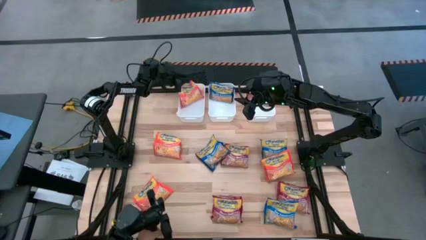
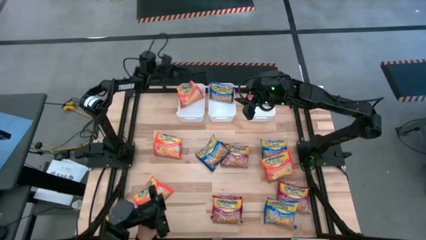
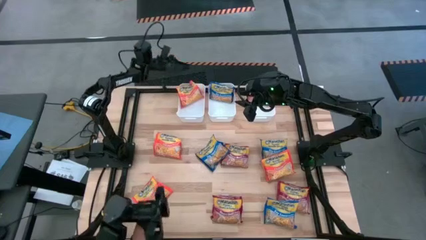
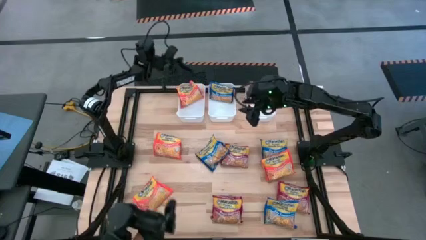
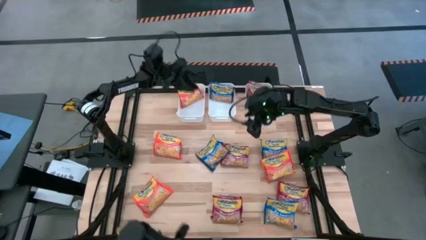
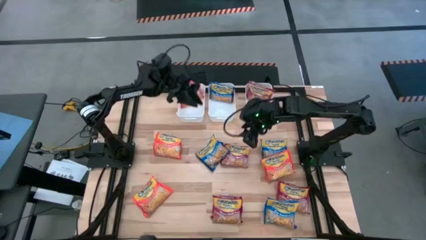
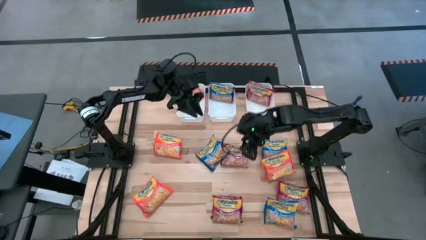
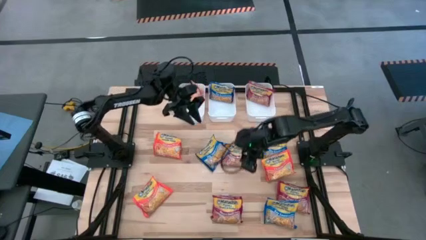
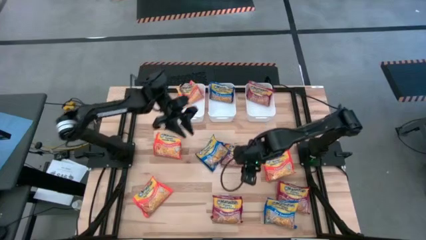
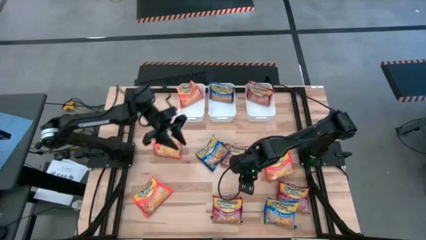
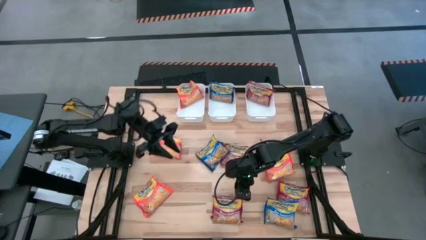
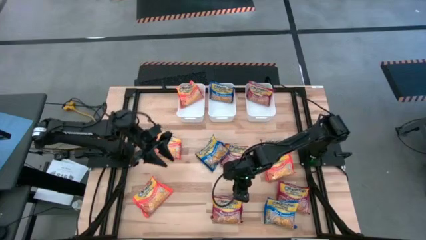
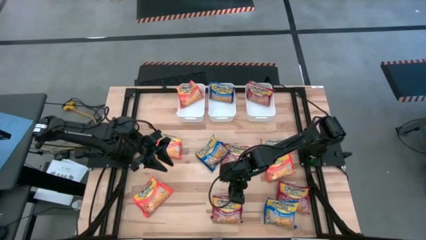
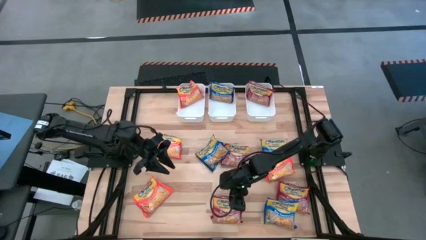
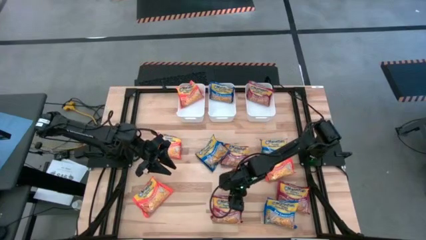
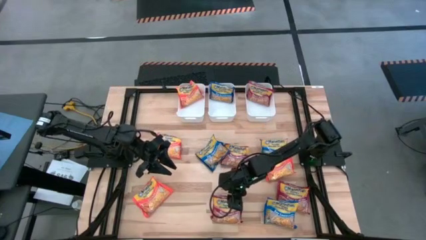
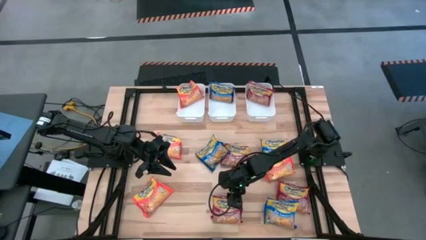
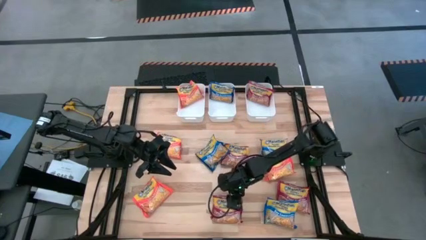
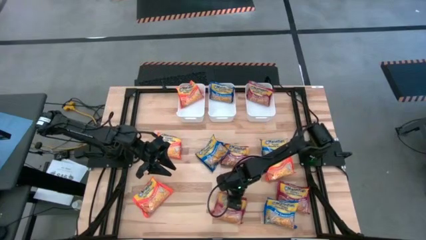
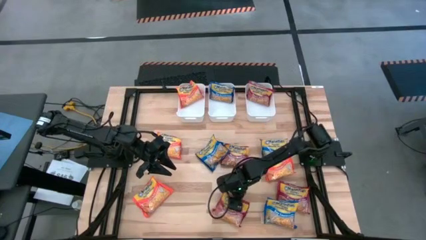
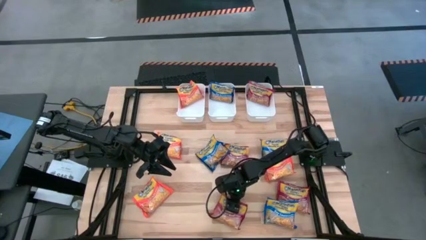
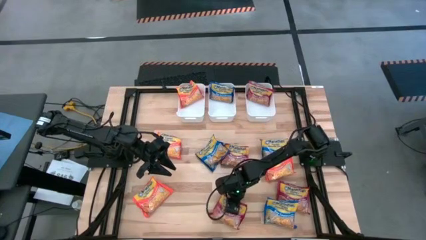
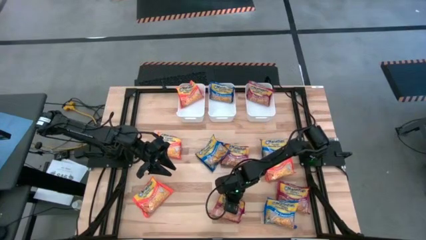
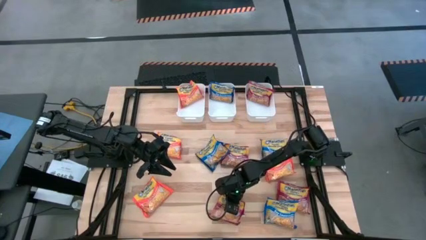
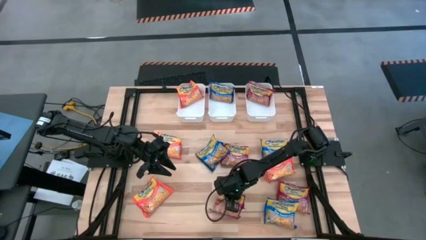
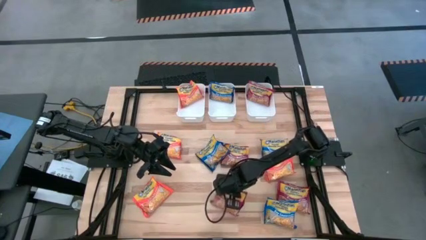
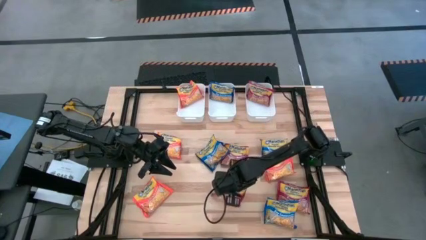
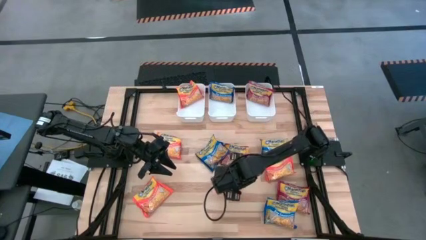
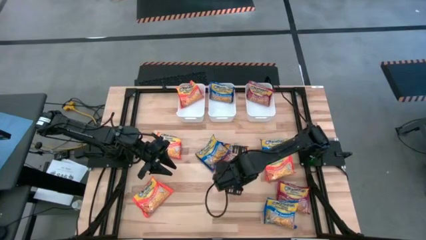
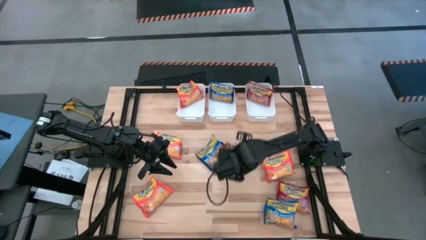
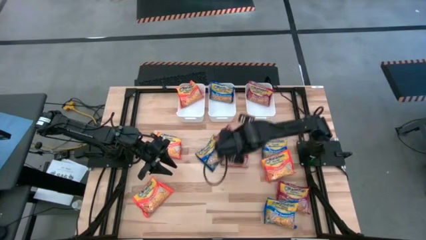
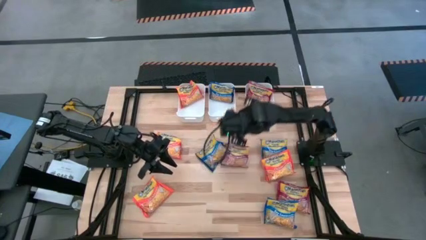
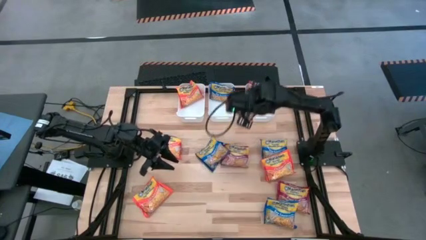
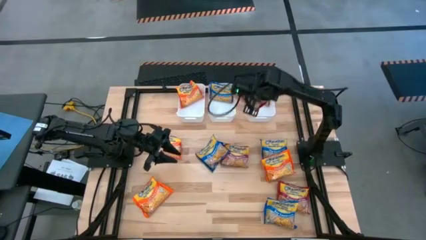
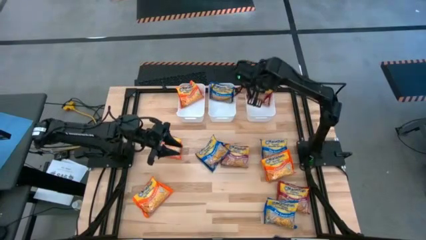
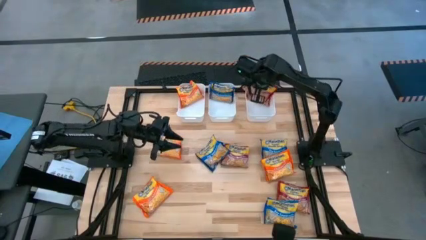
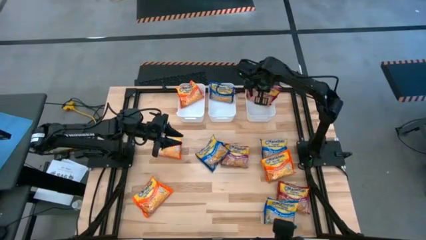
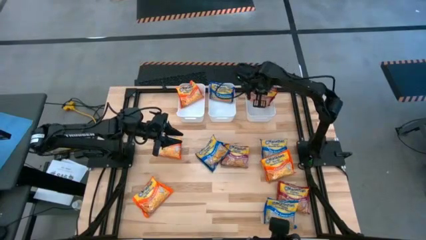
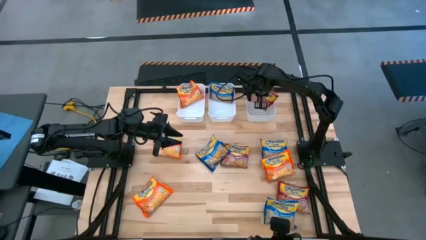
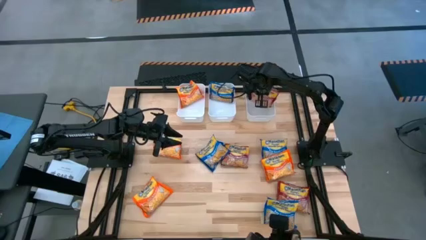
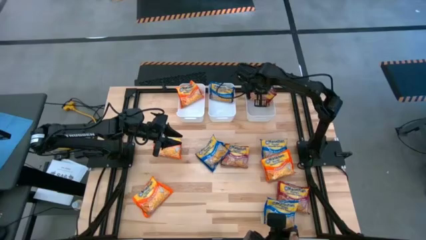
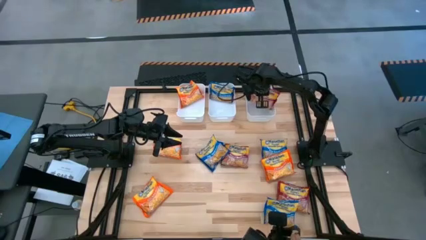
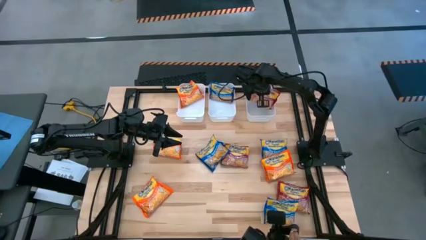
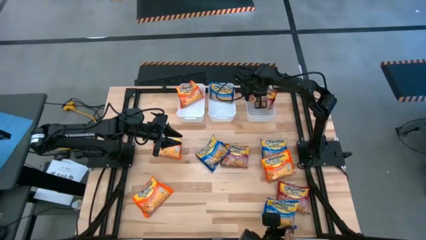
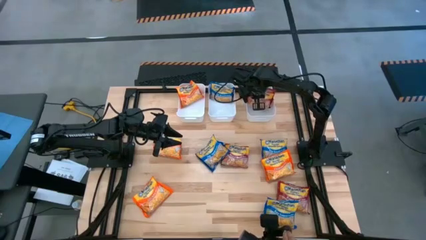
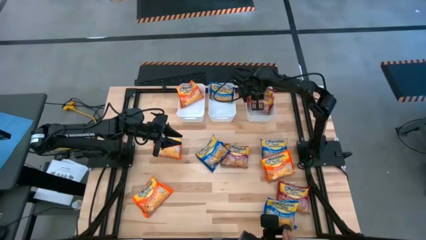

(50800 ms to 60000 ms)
Task: Sort Maruchan noodles
Put the red noodle pack into the right white bin

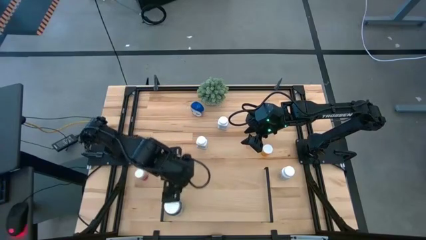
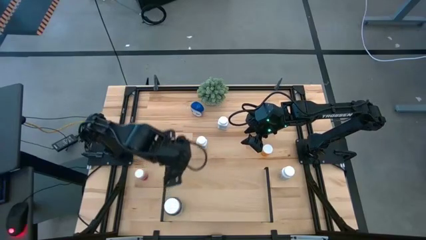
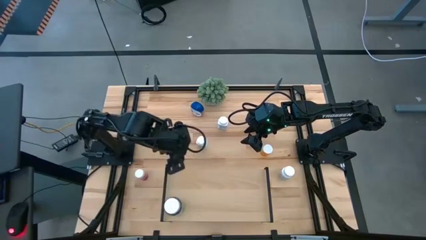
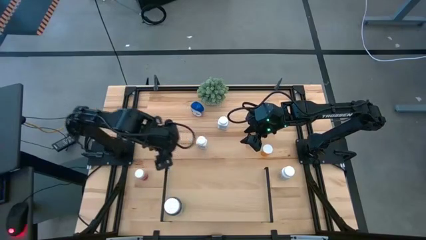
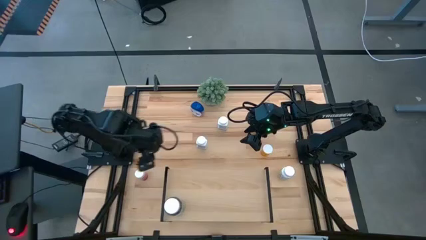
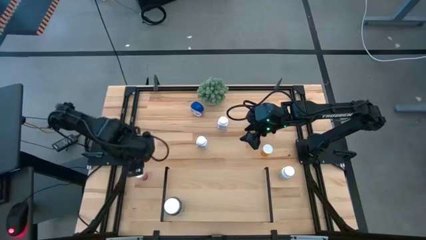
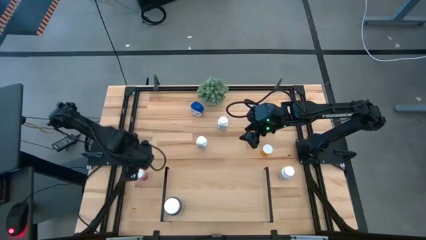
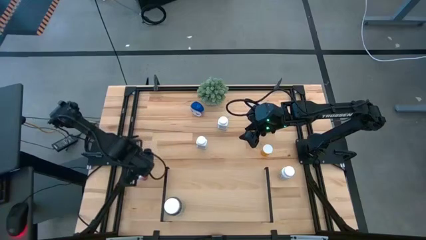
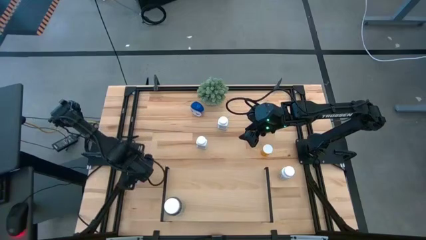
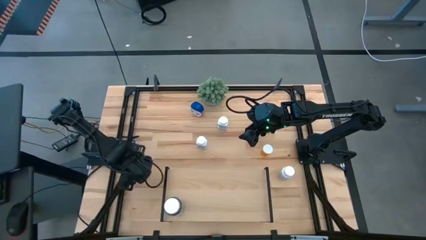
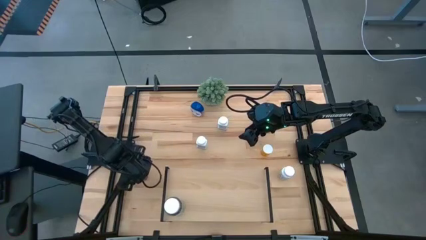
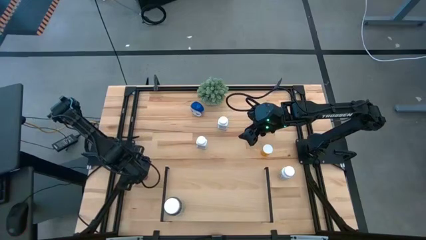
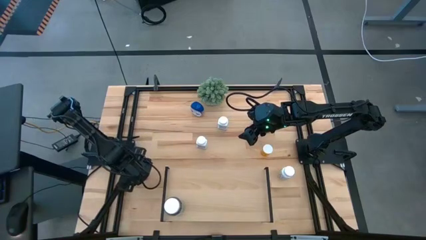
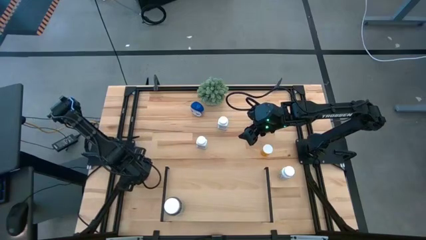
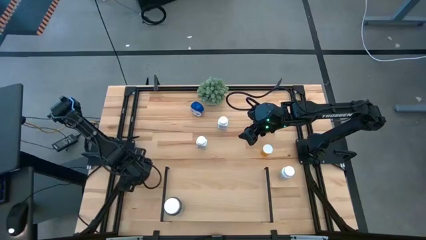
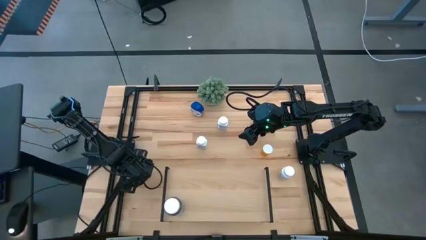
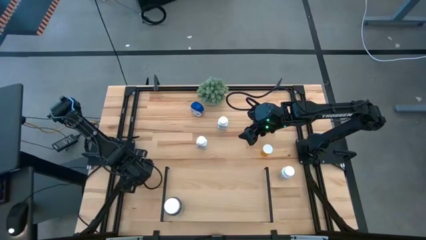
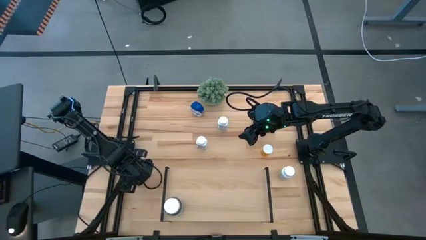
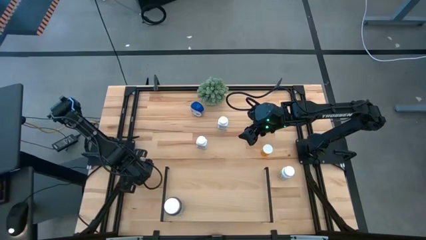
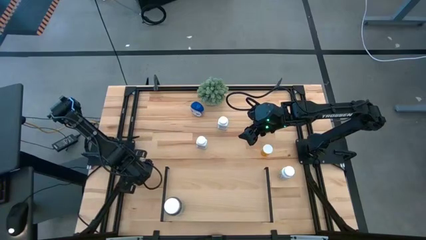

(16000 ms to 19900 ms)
Task: Pick and place medicine bottles onto shelf by color
Put the pink pill bottle on the shelf

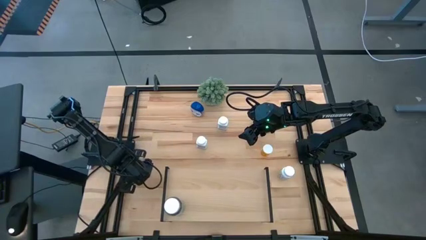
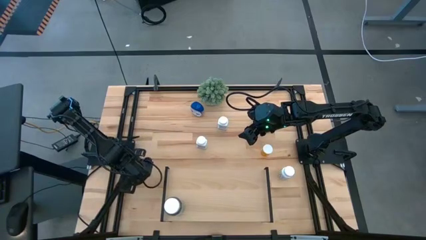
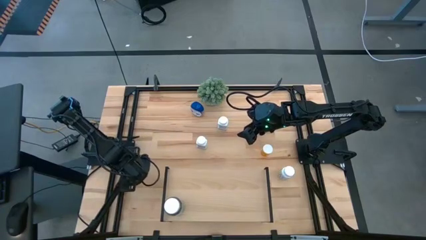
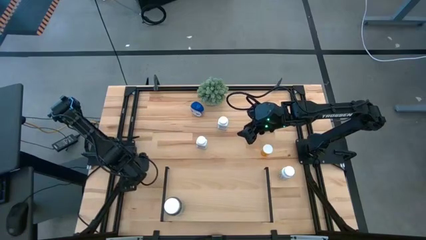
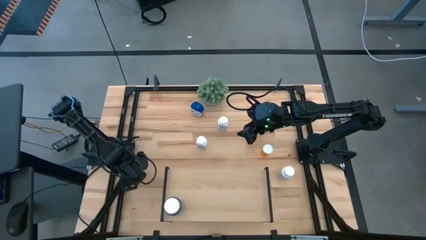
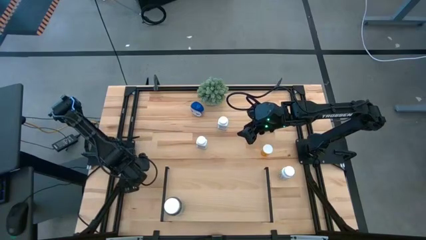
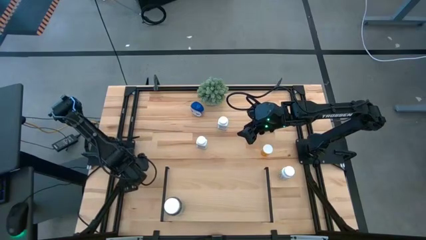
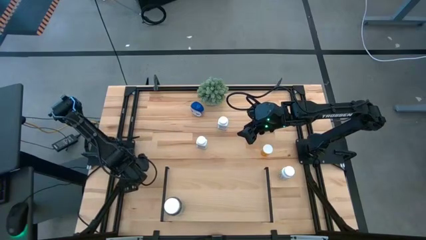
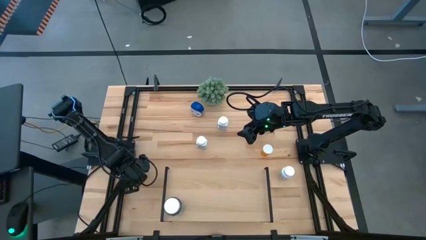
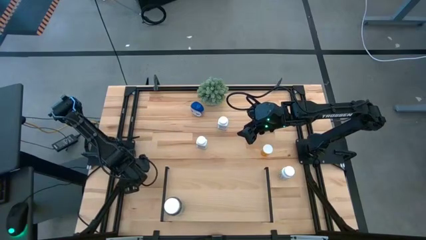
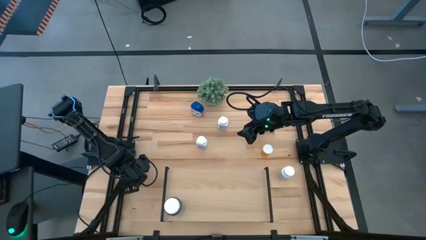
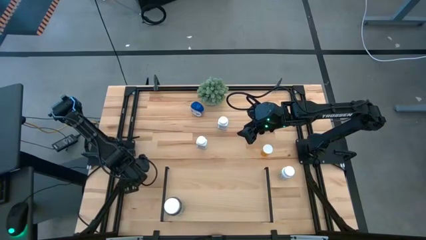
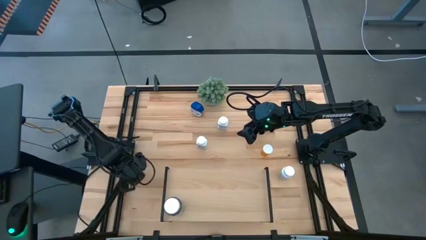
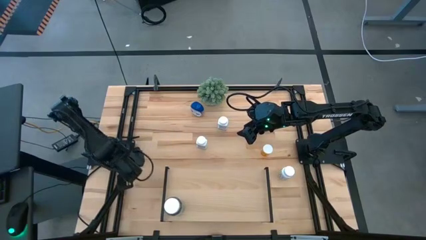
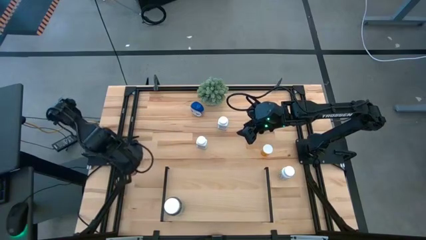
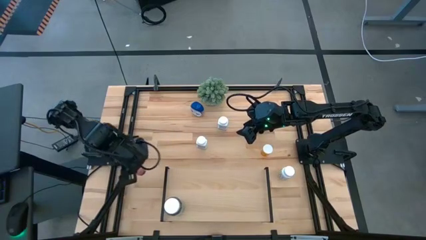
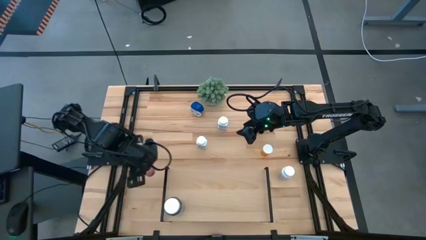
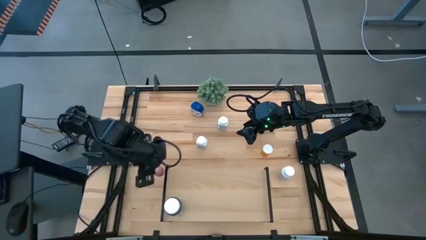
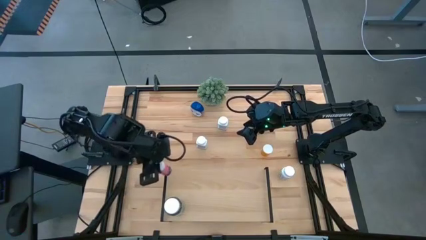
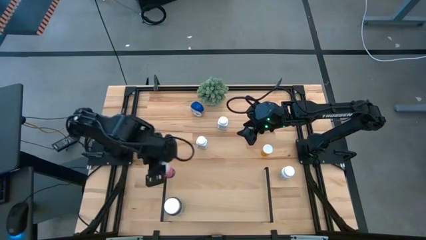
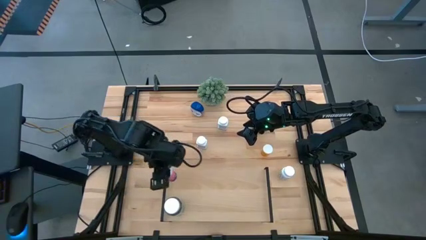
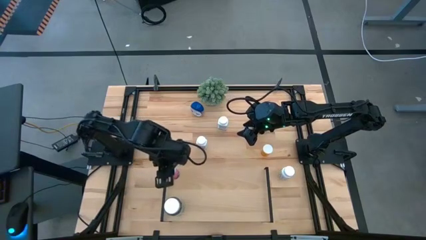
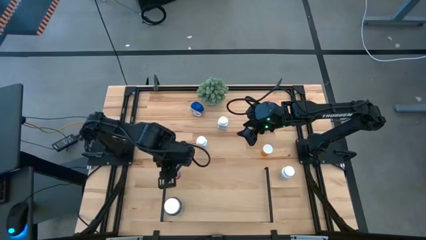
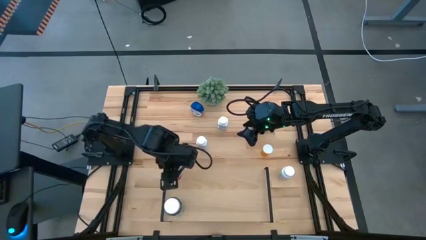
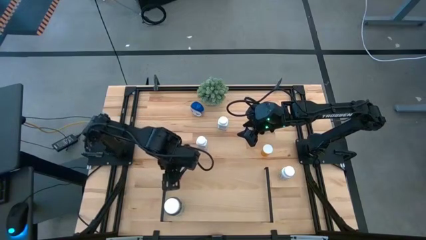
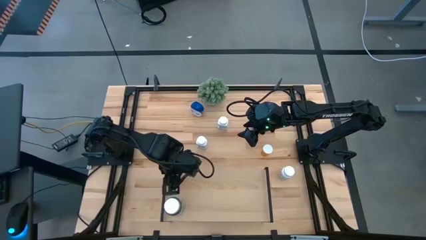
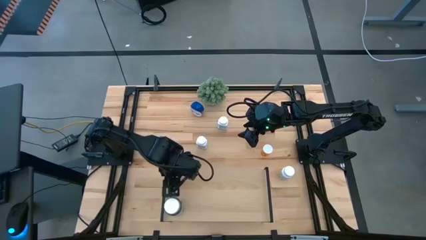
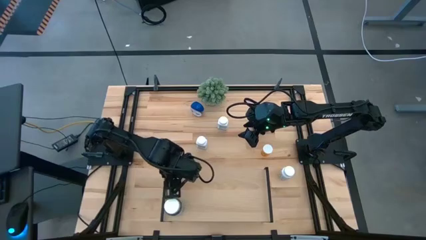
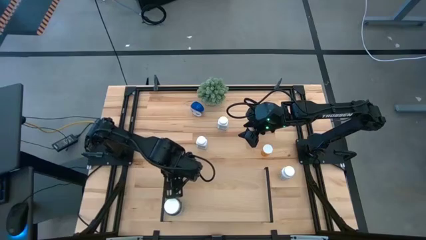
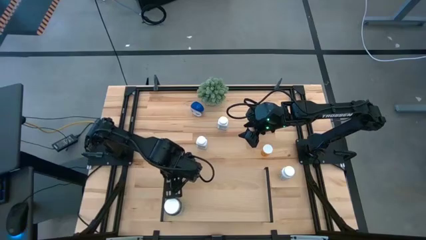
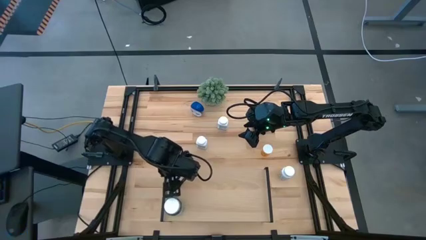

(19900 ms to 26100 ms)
Put the pink pill bottle on the shelf
